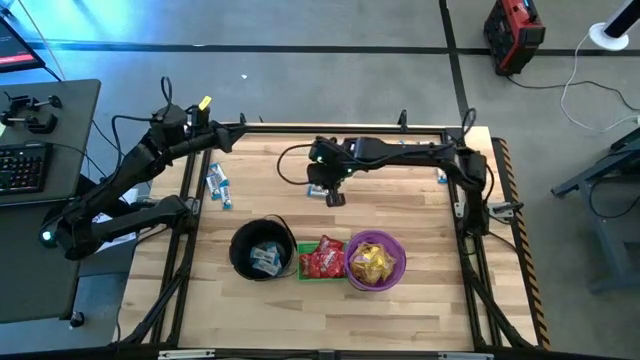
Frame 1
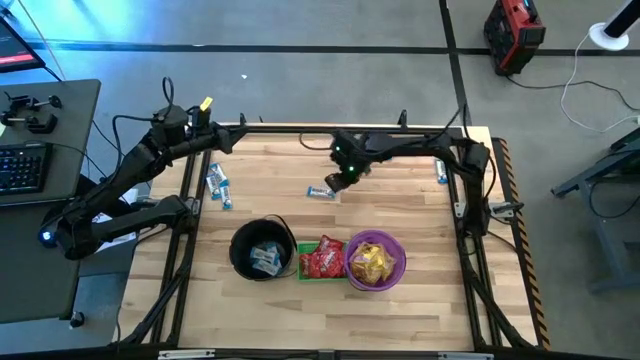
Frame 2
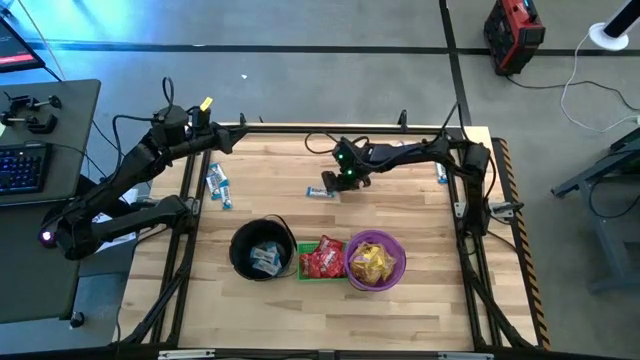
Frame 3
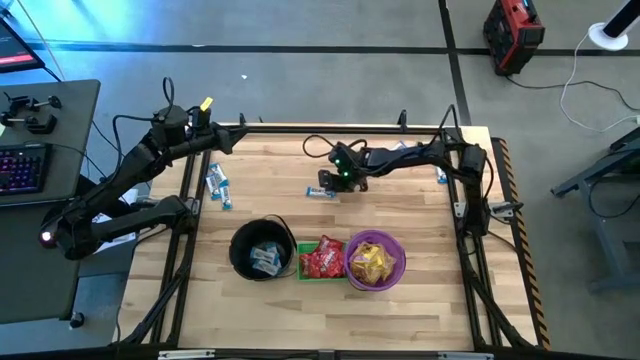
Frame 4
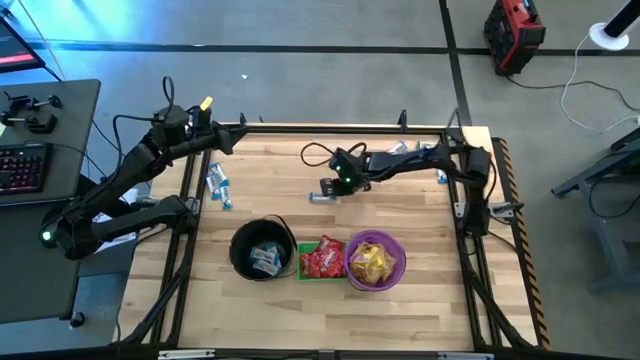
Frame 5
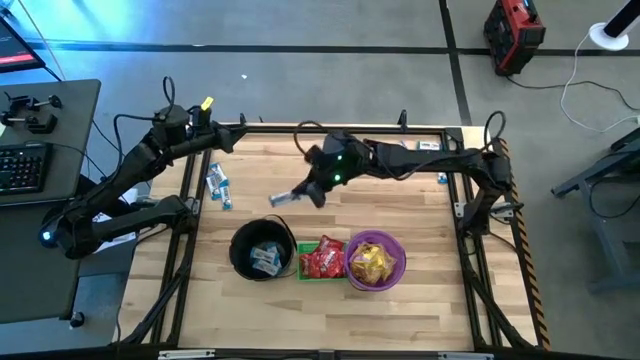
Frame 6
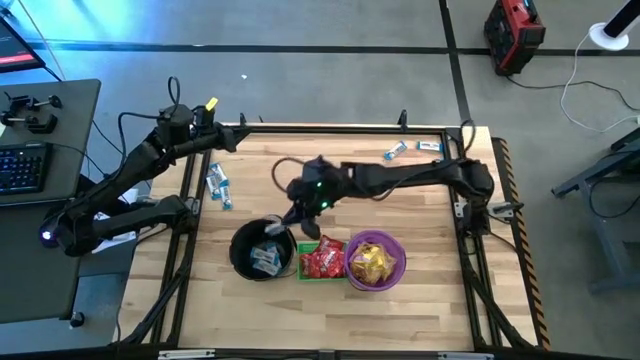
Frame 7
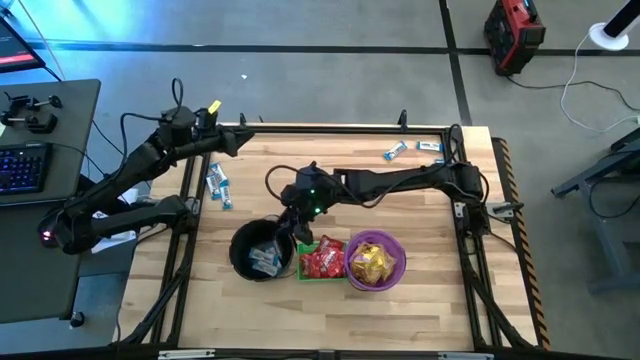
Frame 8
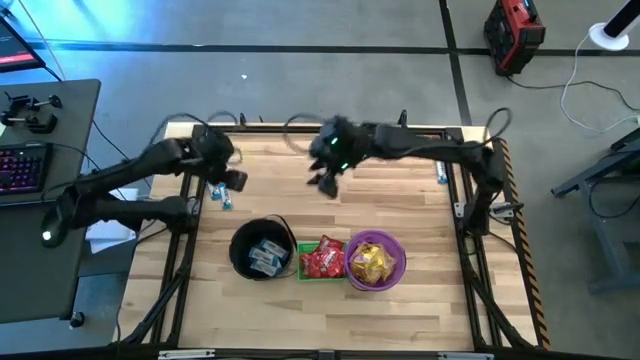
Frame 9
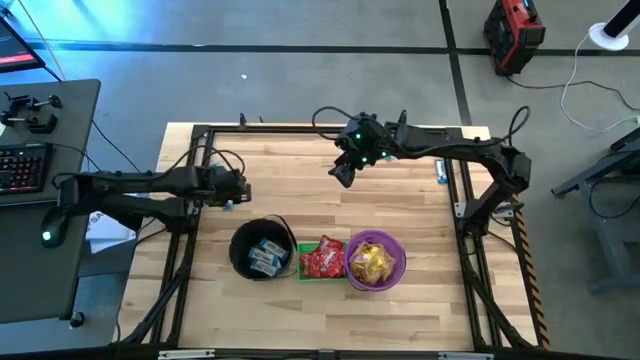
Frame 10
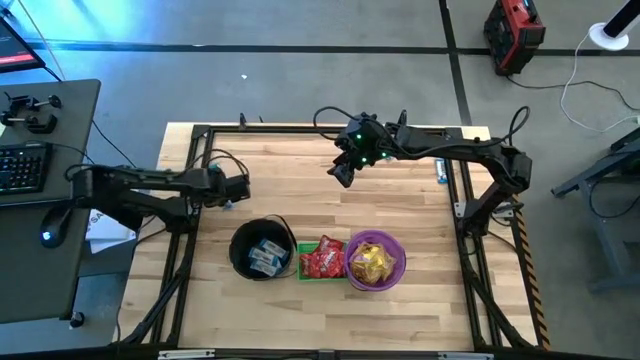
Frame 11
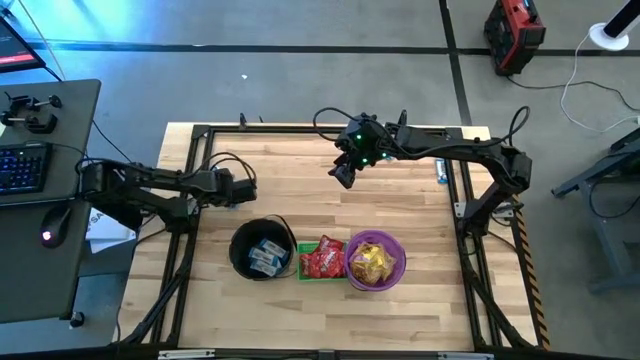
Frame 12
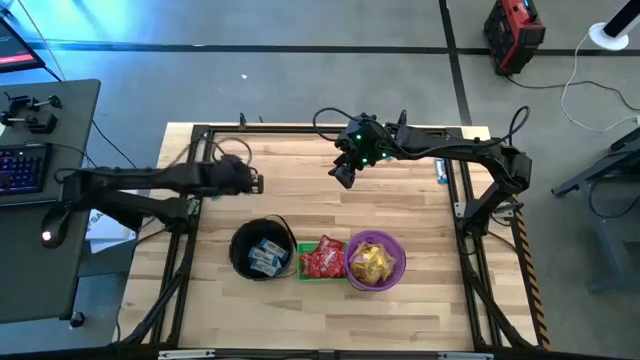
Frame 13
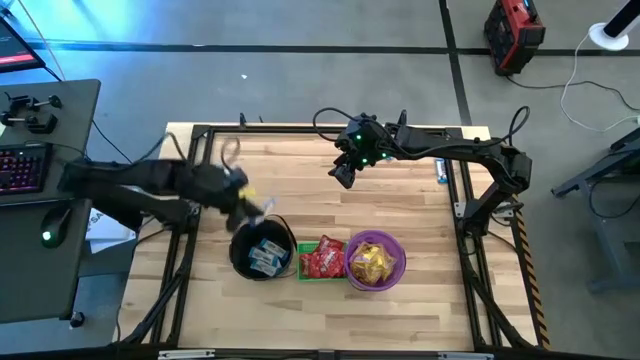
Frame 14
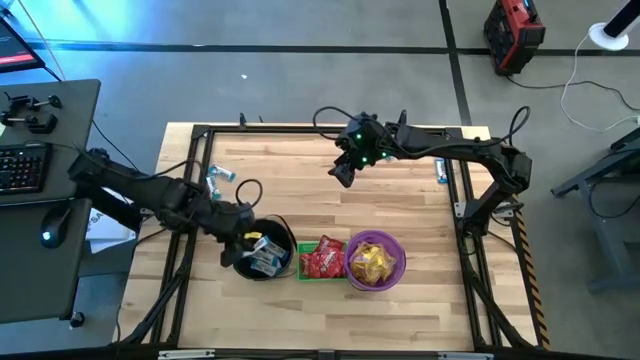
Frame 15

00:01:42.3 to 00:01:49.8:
Task: Sort candy by brand, put in halloween buckets
Put the white chocolate into the black bucket

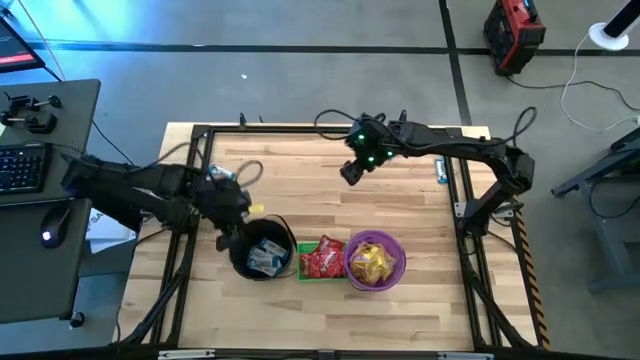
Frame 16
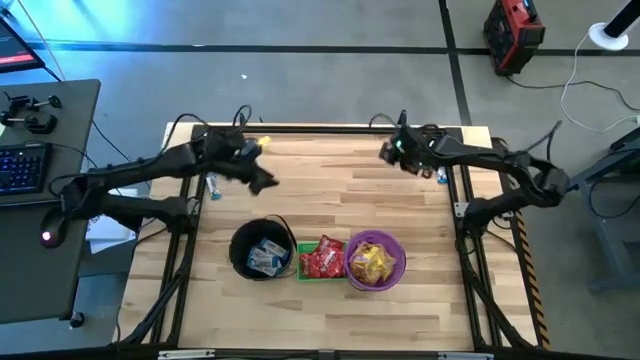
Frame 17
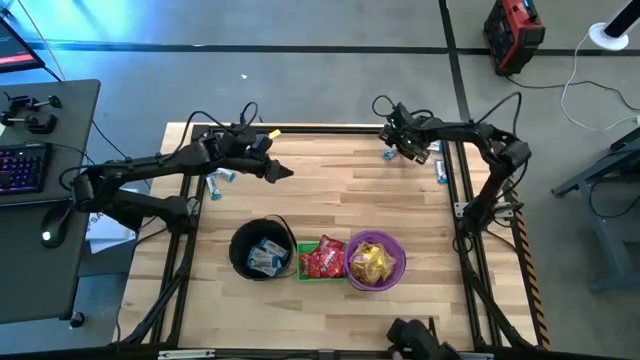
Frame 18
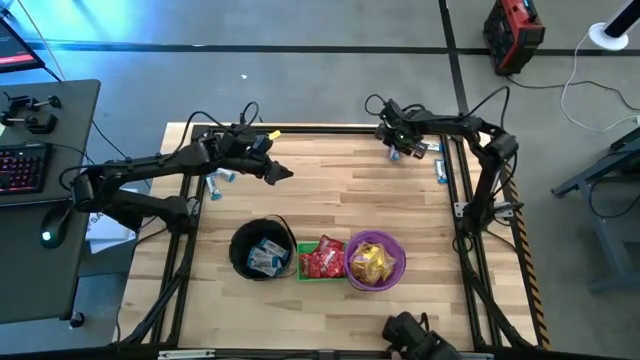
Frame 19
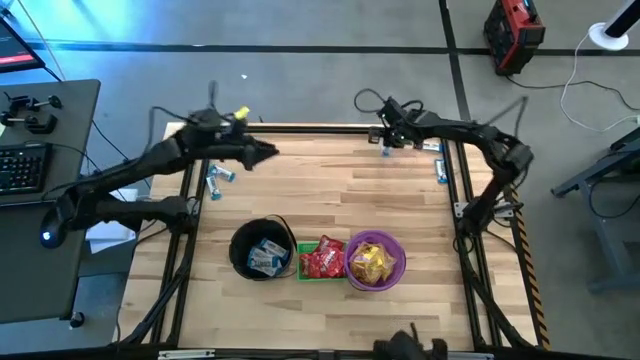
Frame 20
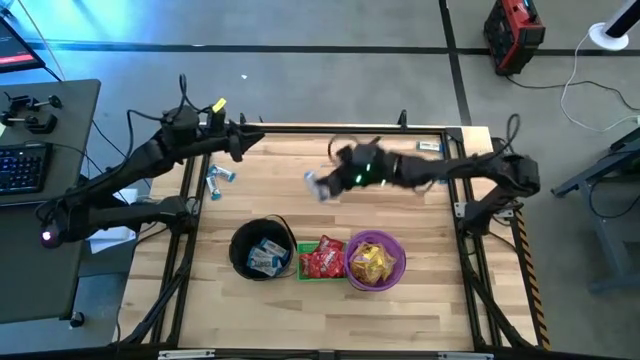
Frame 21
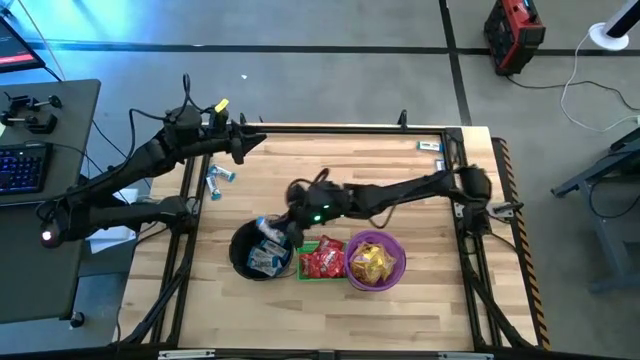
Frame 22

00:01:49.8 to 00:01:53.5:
Put the white chocolate into the black bucket

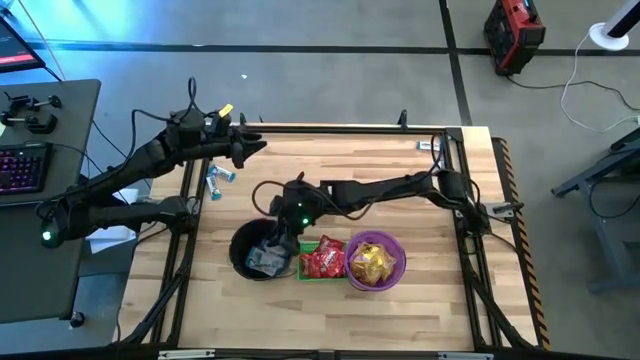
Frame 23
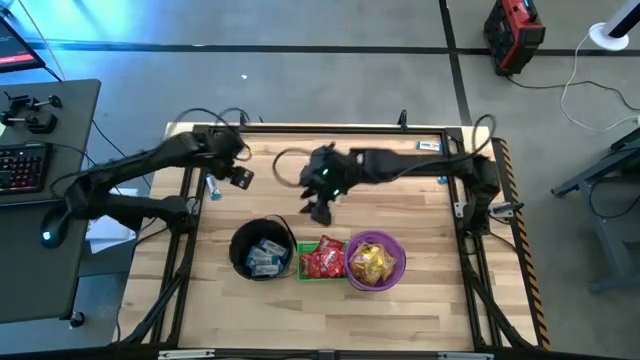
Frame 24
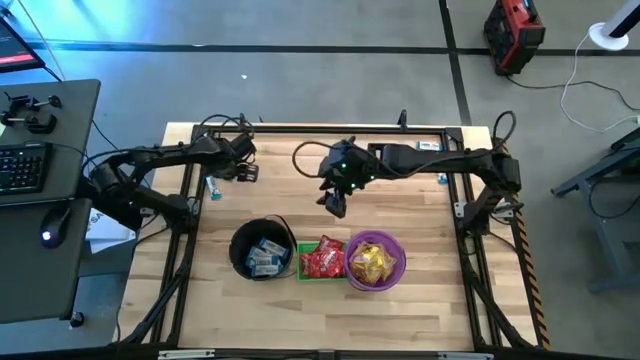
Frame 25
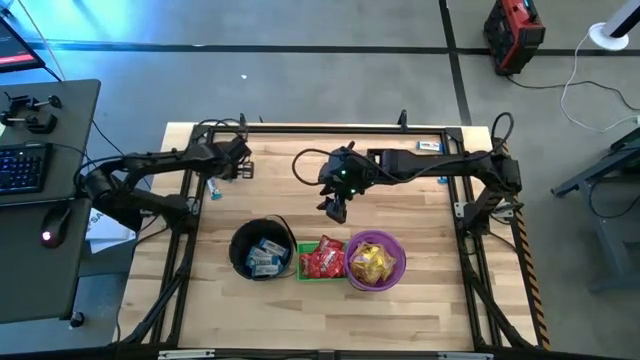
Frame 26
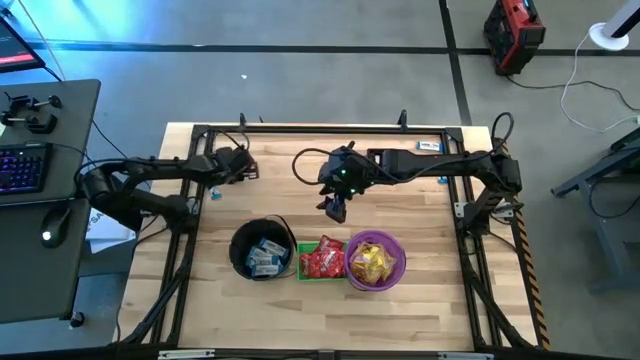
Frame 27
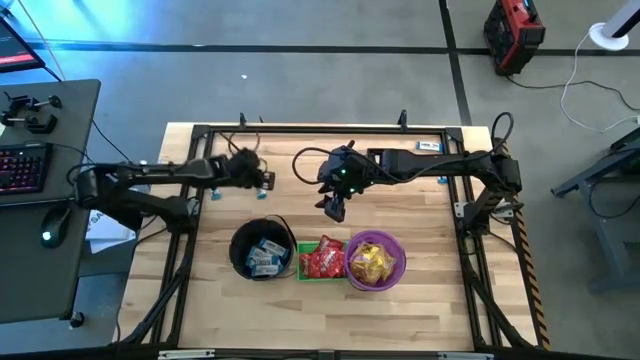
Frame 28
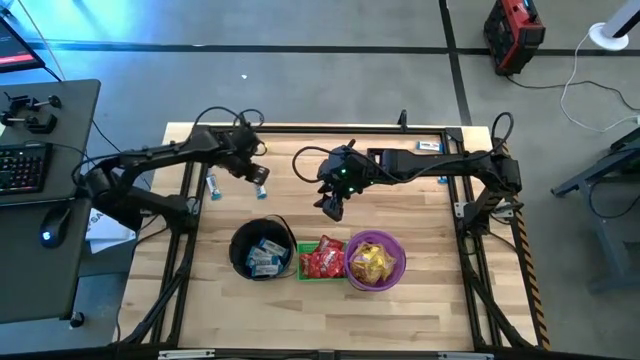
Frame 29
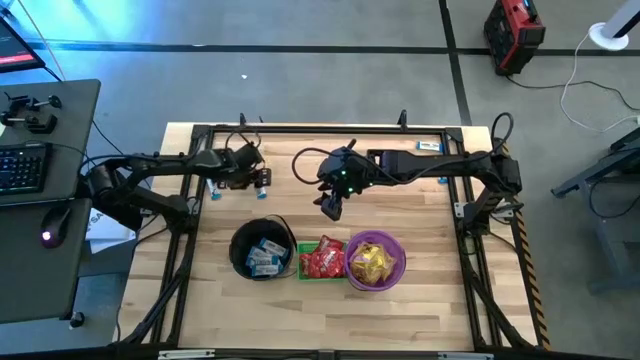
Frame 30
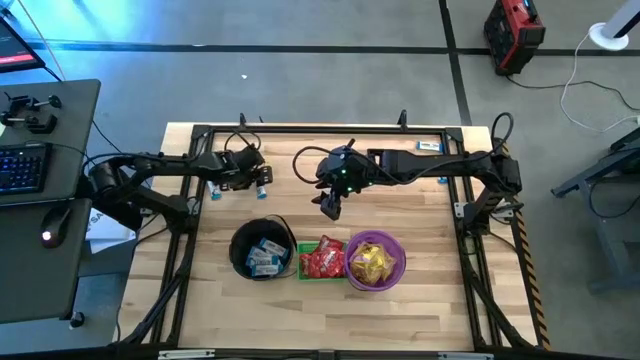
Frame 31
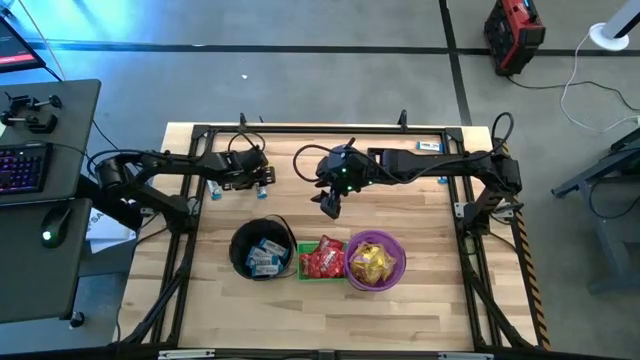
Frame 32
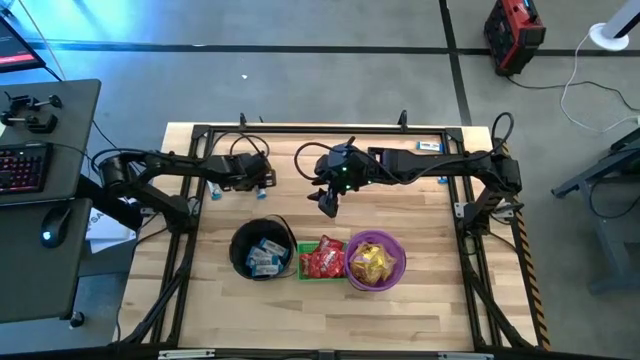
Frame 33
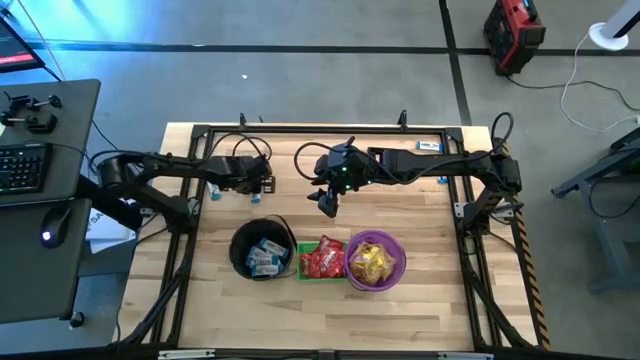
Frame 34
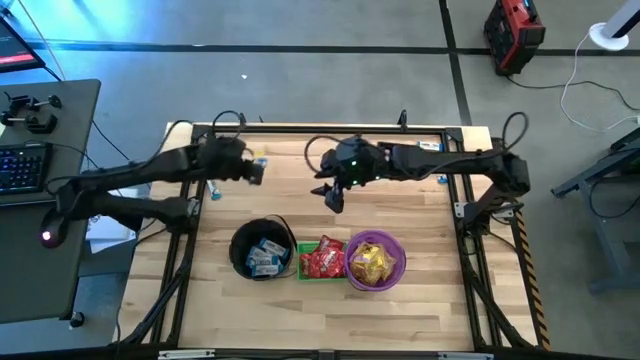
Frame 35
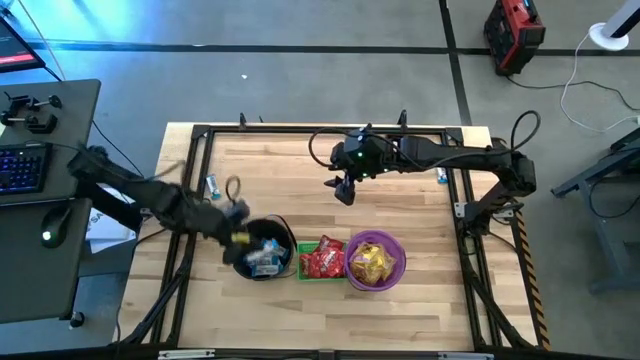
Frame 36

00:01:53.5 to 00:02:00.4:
Put the white chocolate into the black bucket

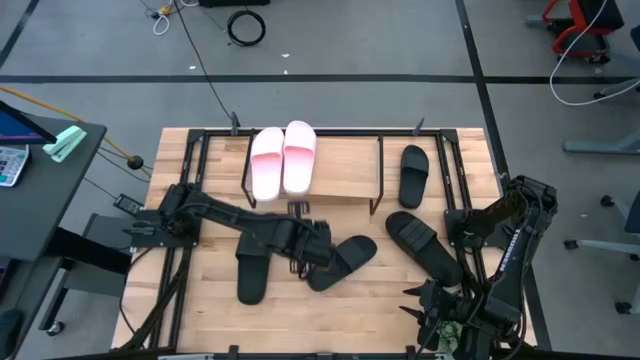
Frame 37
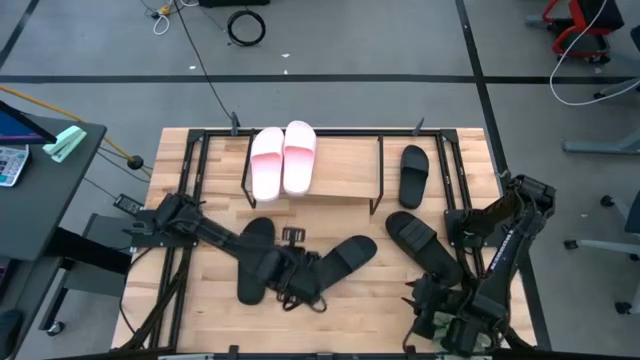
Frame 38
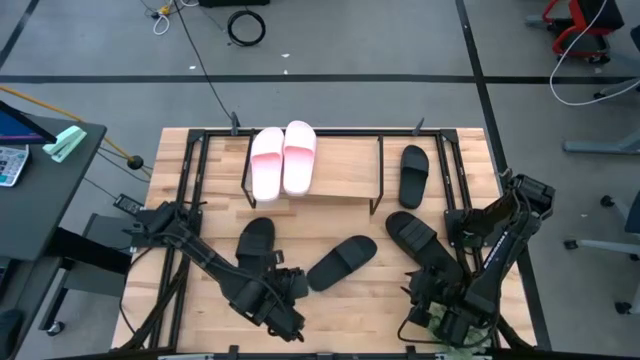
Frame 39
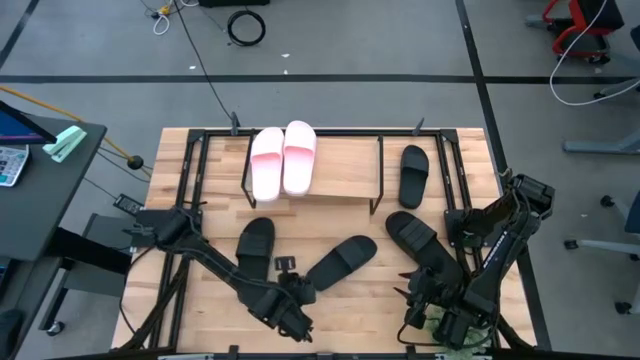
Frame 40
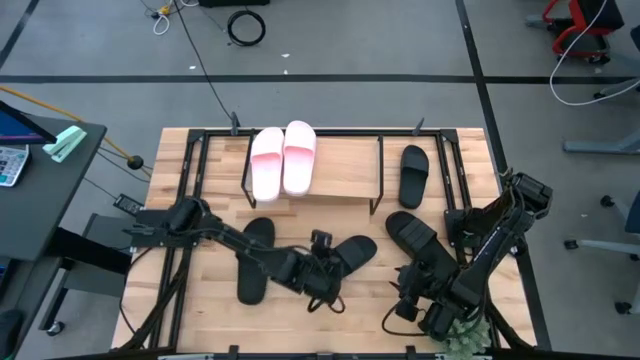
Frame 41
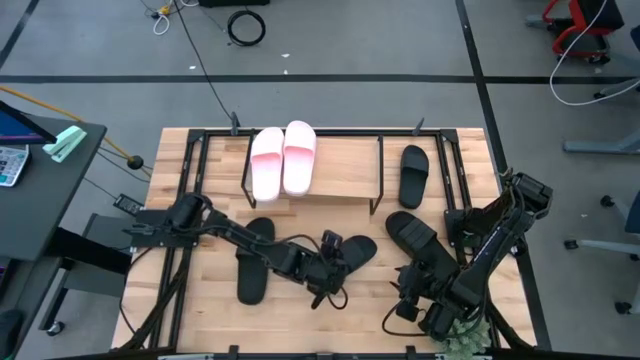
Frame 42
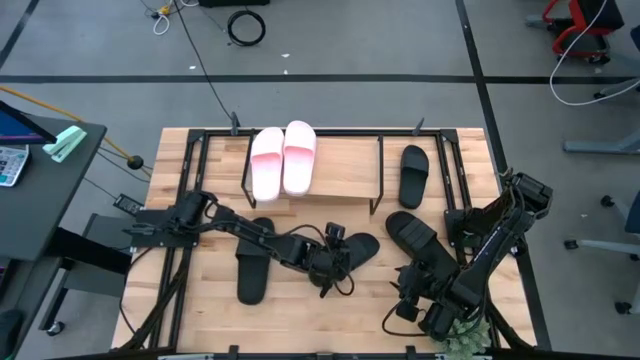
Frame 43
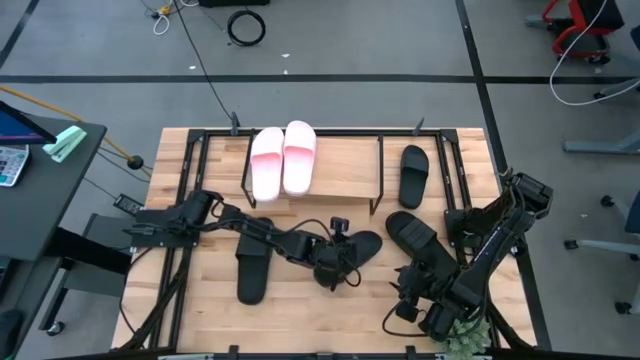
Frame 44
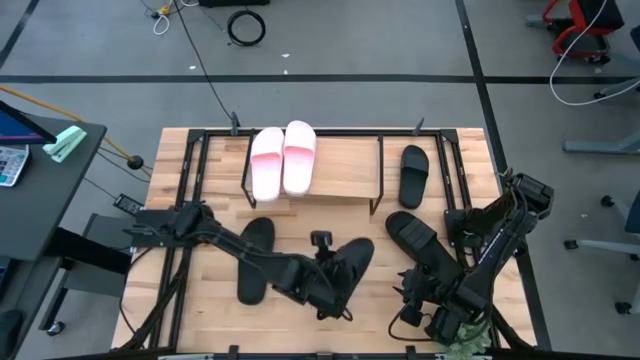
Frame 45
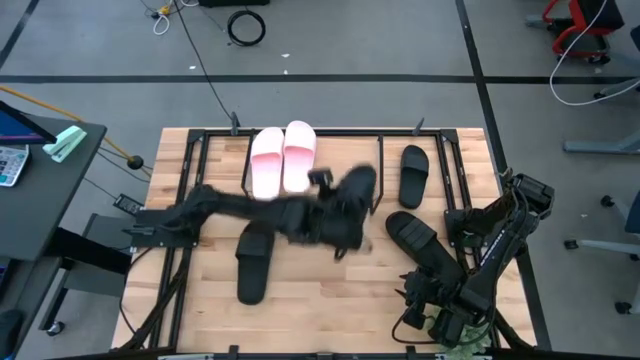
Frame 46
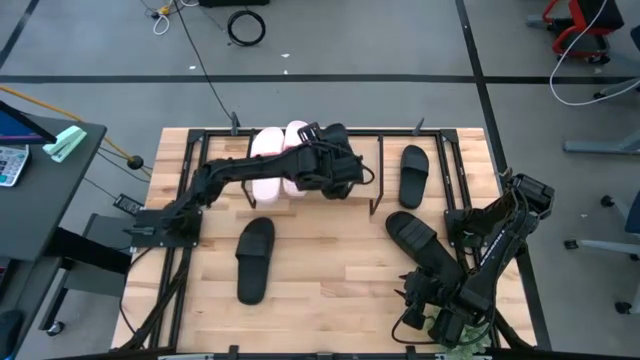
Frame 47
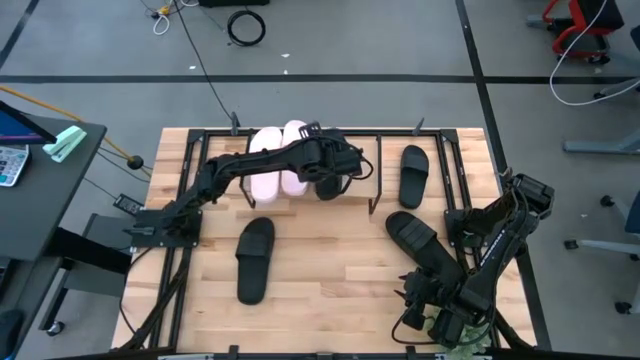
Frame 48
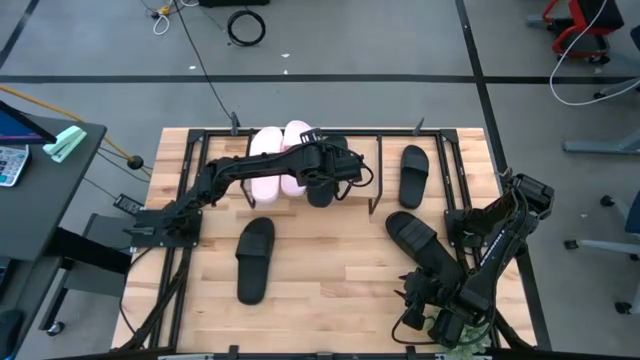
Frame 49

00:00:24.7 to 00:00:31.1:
Task: Pick and place slides into the shelf
Put the black slipper on the shelf
